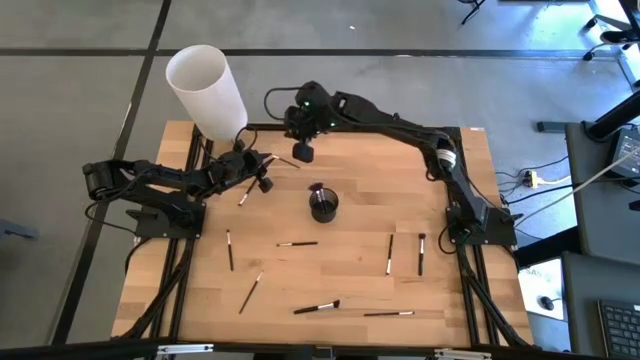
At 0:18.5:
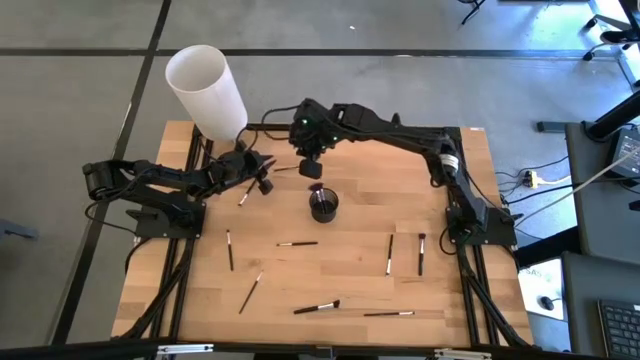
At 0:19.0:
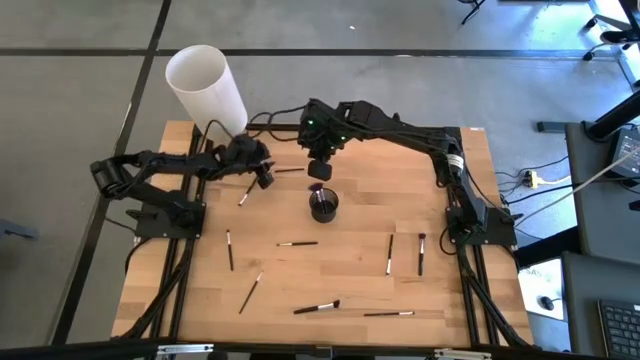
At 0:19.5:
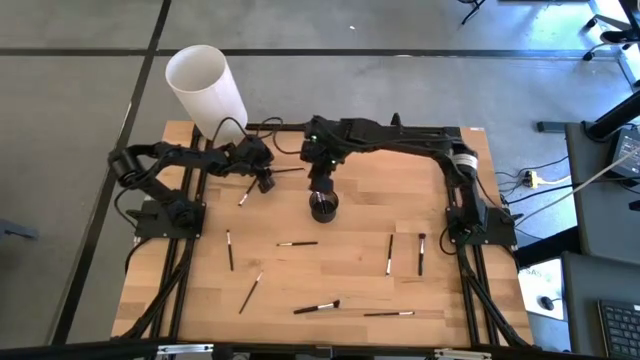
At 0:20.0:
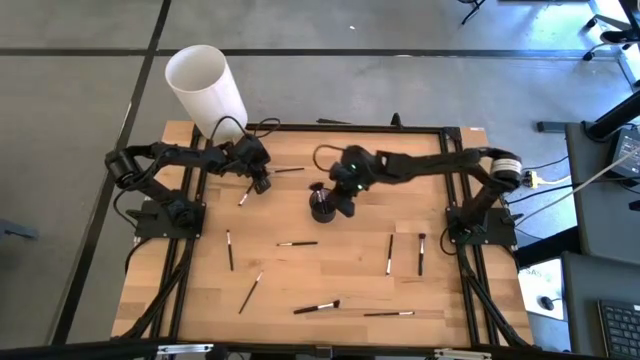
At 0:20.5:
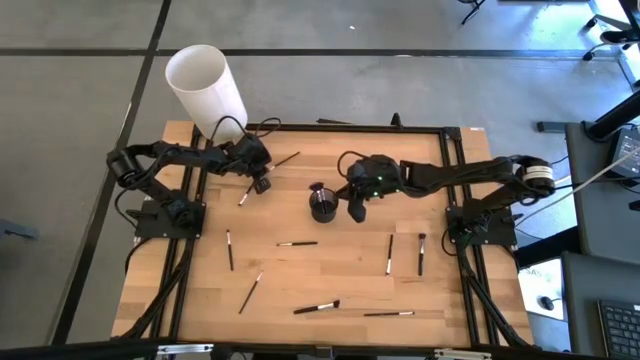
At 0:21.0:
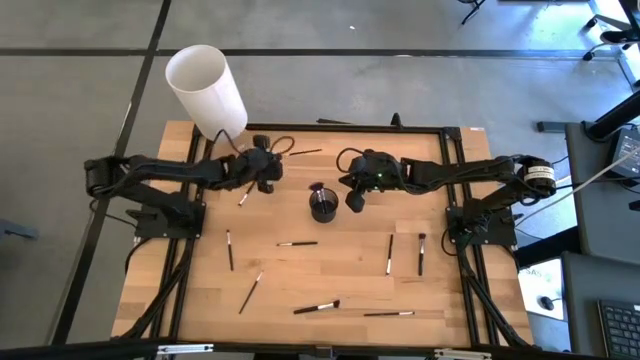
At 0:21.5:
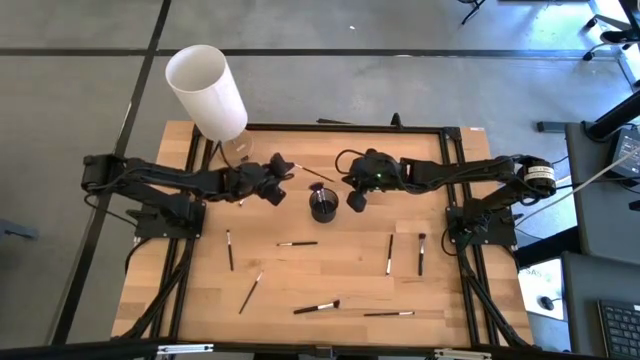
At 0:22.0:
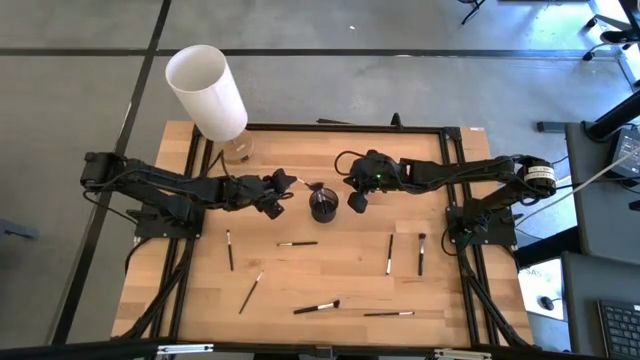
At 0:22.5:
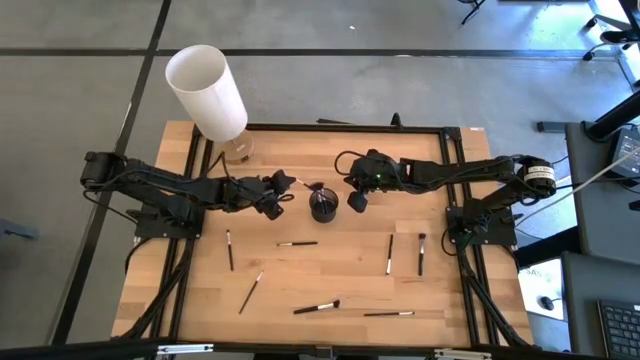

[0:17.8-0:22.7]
Task: Pick & Place Makeup Brushes
Put the eyeshadow brush into the makeup brush holder

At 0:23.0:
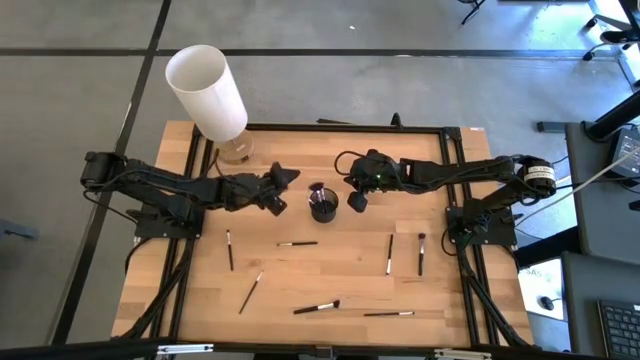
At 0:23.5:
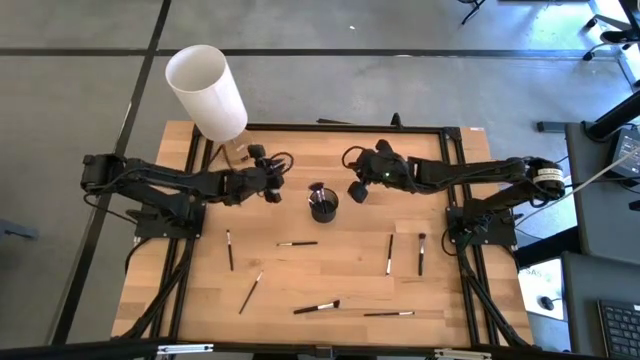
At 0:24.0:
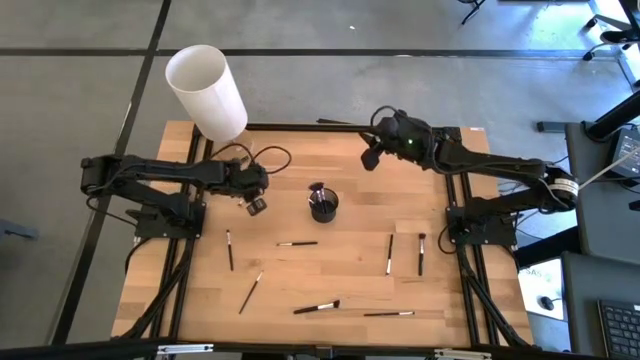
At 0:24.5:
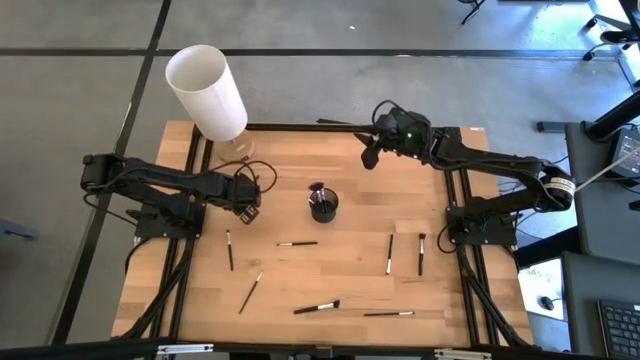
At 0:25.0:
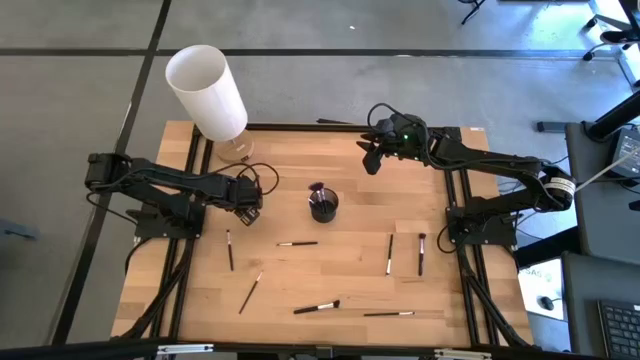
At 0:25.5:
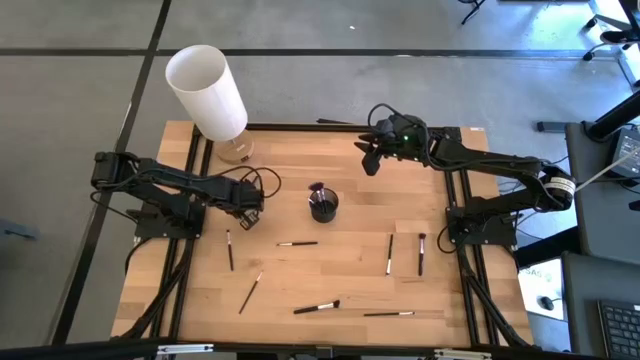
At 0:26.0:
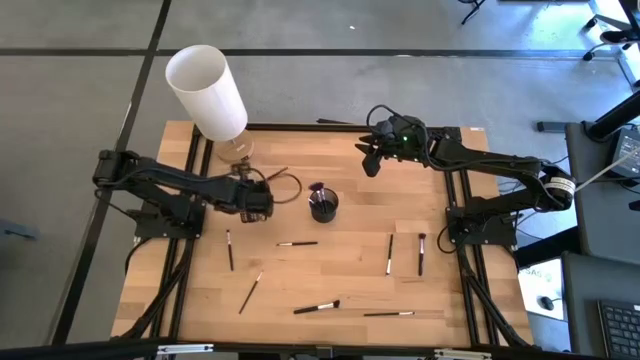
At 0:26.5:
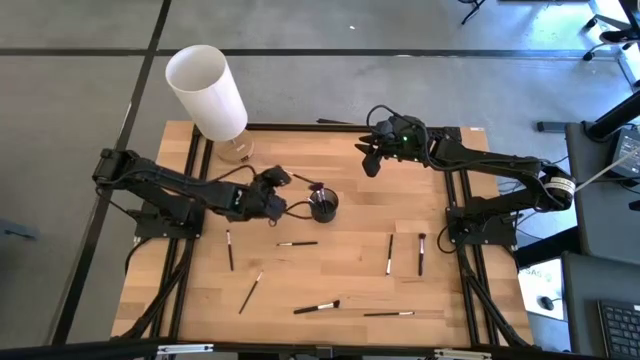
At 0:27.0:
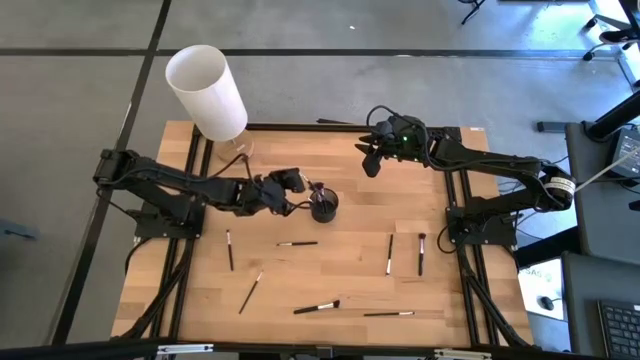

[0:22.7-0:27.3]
Put the eyeshadow brush into the makeup brush holder

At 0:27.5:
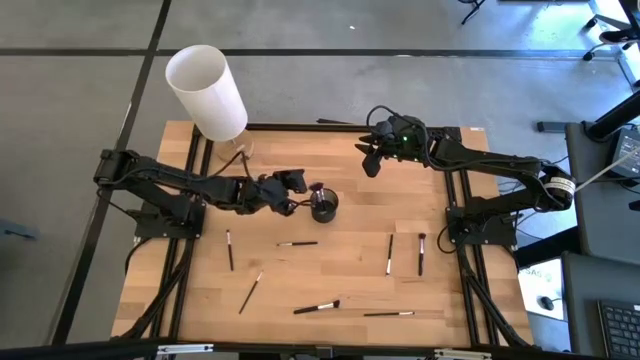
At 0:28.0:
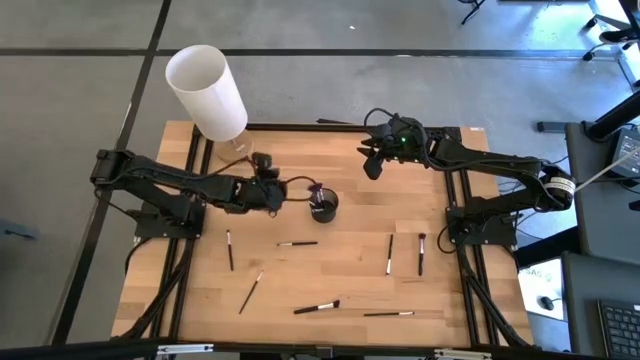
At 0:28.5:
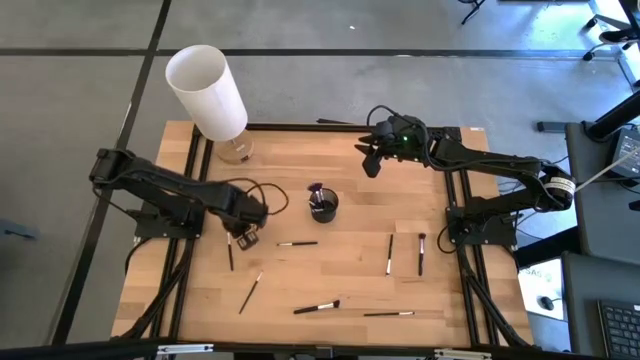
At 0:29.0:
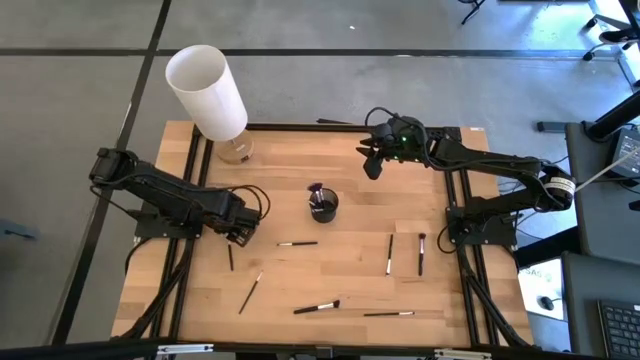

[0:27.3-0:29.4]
Put the eyeshadow brush into the makeup brush holder

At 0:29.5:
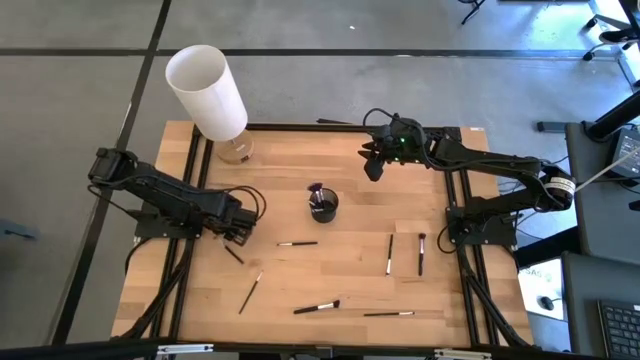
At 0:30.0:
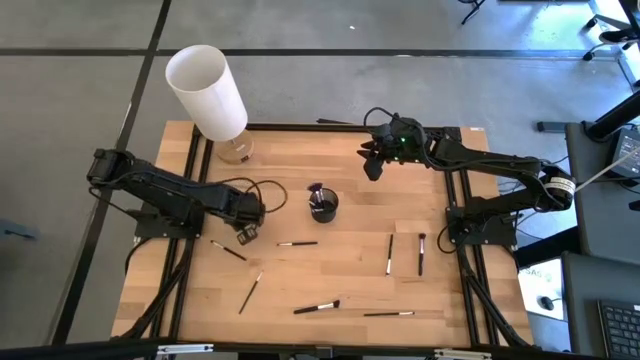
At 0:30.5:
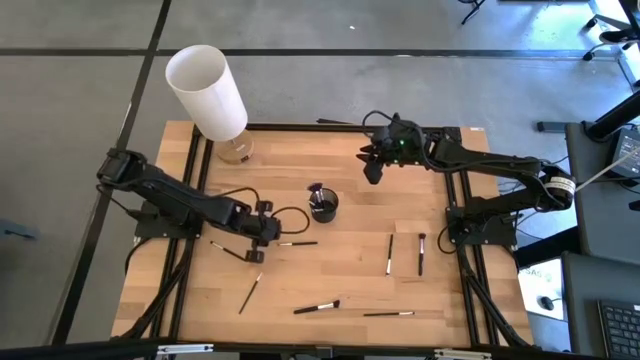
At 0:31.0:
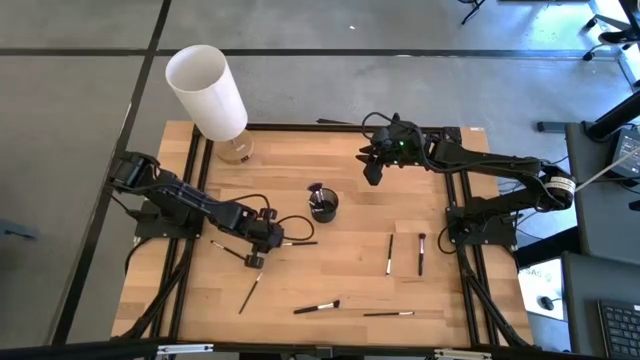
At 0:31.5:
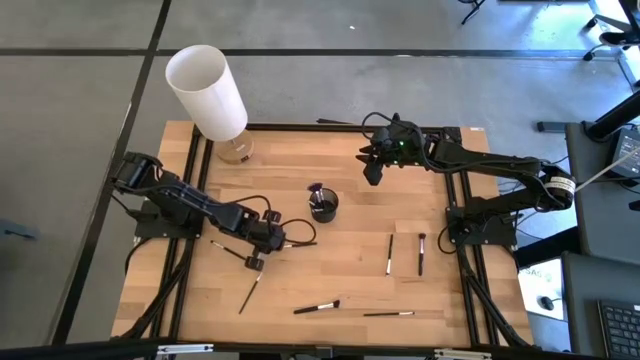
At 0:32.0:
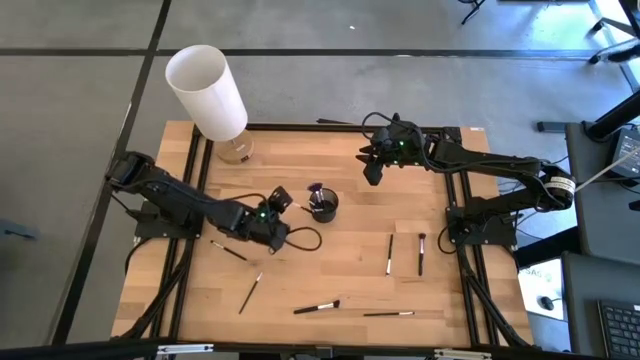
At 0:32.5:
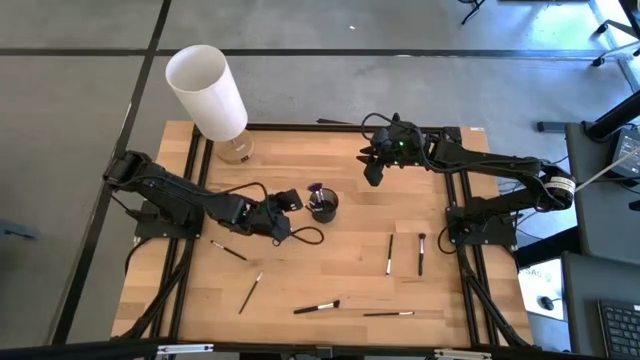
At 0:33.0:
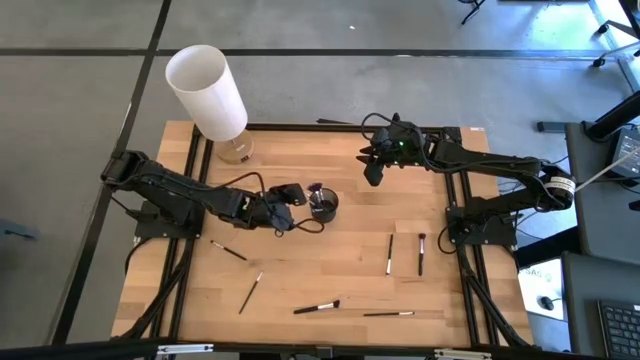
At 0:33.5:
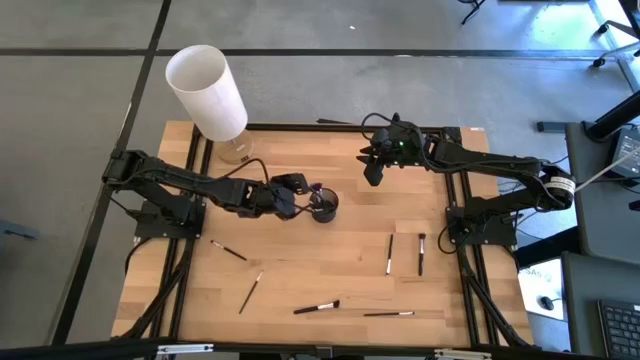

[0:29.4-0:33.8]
Put the eyeshadow brush into the makeup brush holder

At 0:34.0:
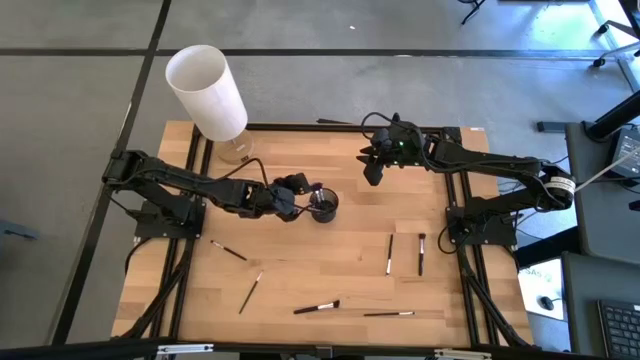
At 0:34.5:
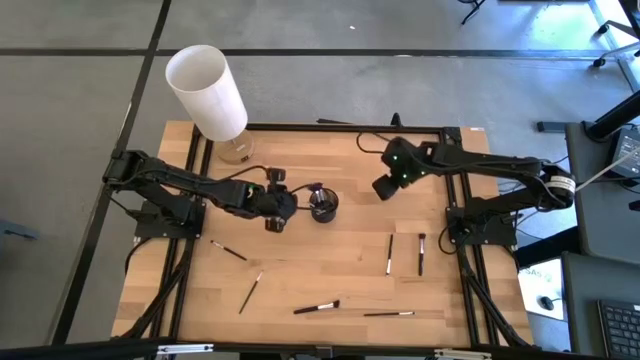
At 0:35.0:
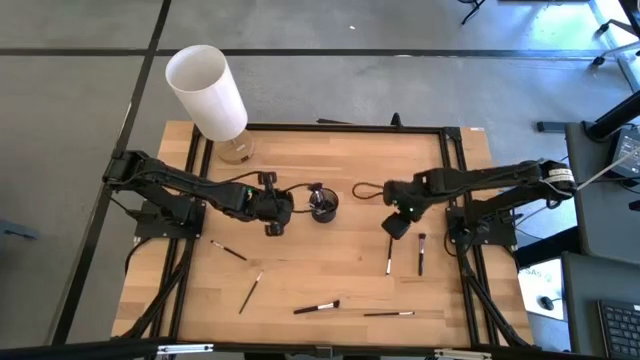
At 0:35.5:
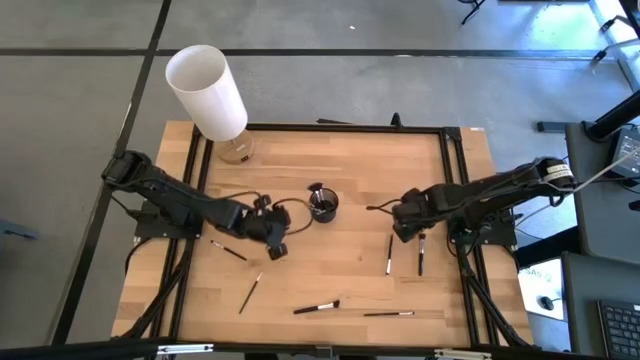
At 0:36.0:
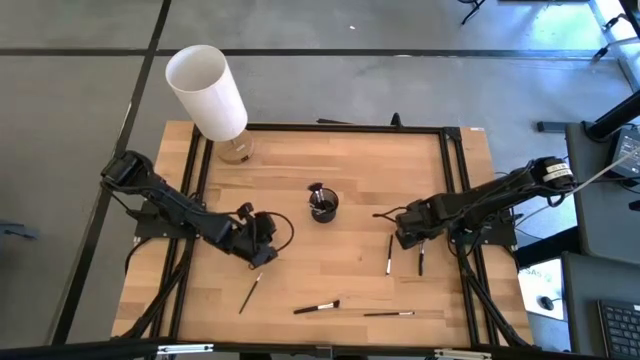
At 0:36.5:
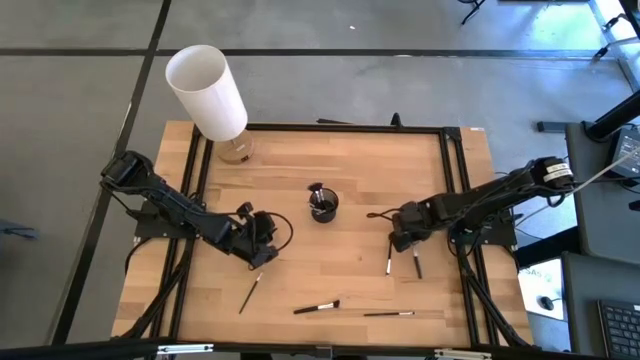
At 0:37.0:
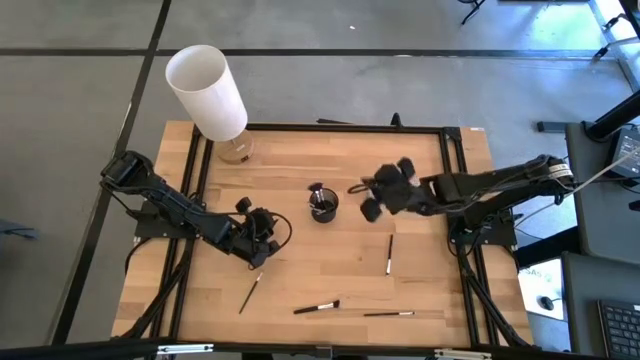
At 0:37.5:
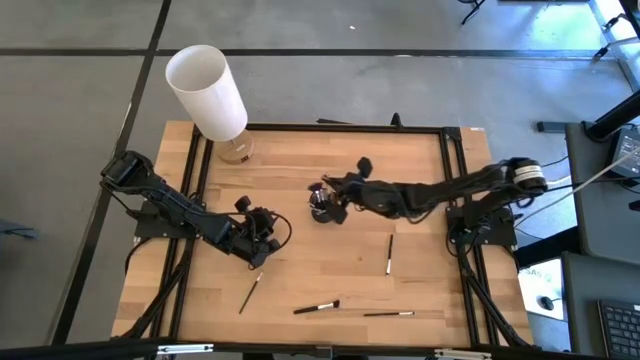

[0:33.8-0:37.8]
Put the powder brush into the makeup brush holder

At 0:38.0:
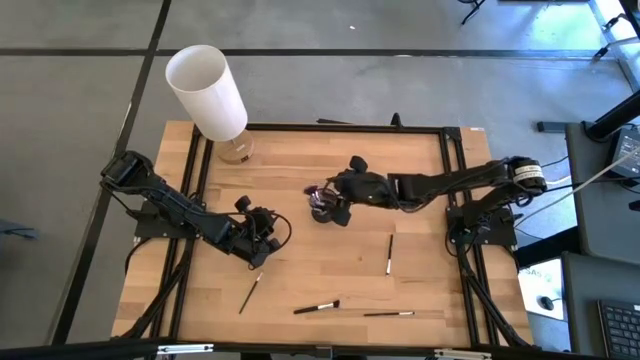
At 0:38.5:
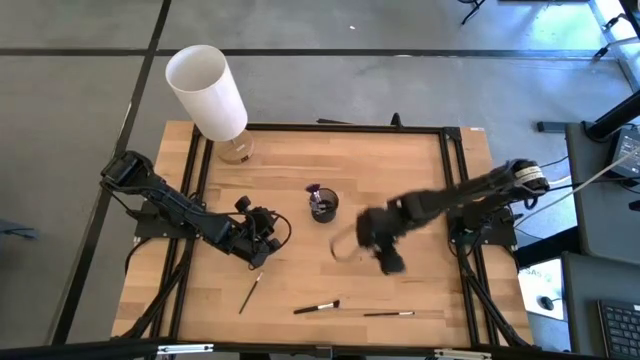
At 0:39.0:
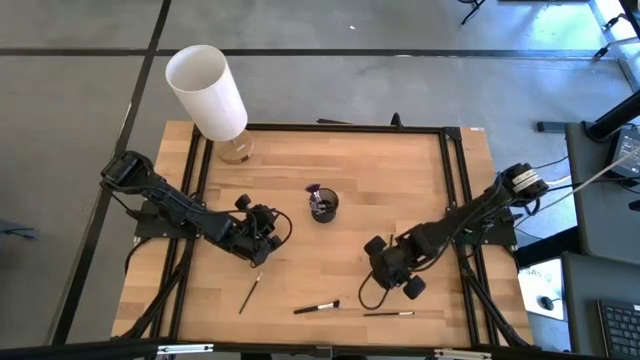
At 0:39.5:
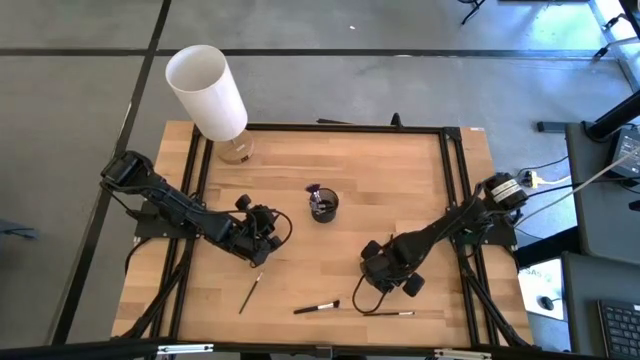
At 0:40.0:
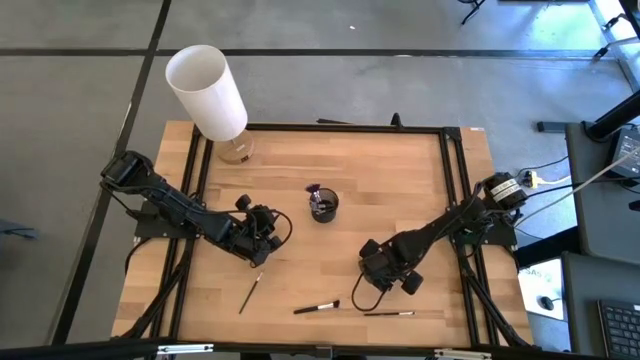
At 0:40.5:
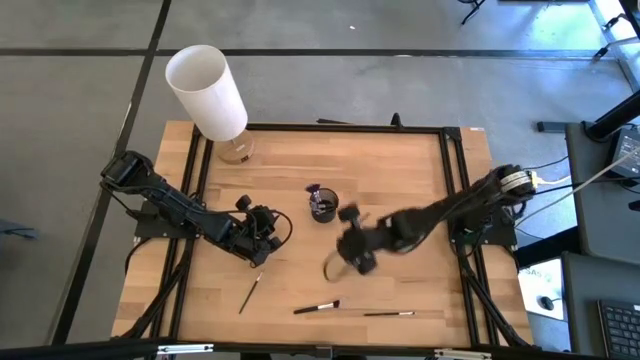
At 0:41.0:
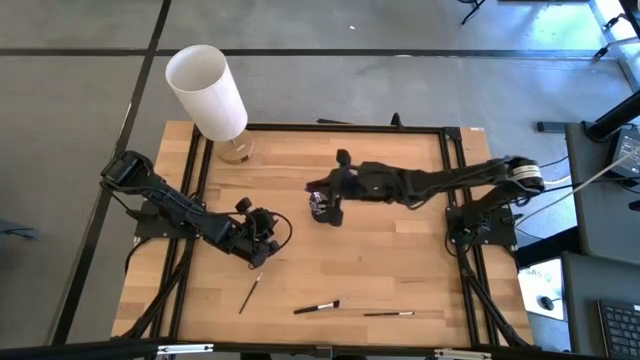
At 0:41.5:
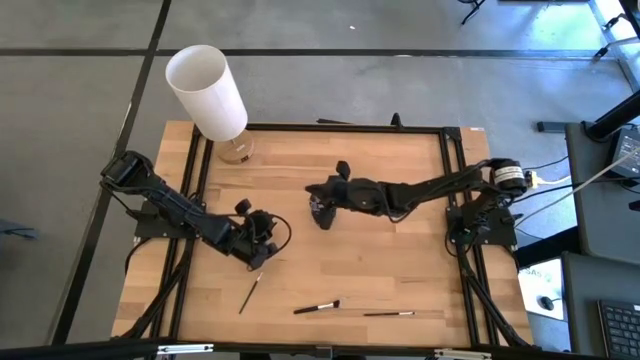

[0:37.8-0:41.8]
Put the eyeshadow brush into the makeup brush holder
